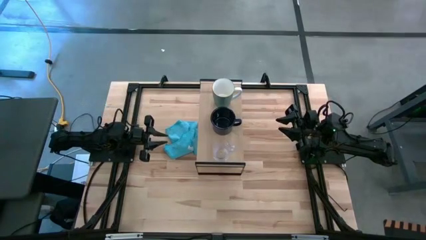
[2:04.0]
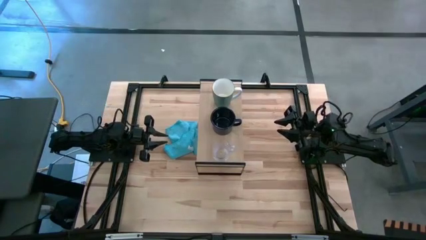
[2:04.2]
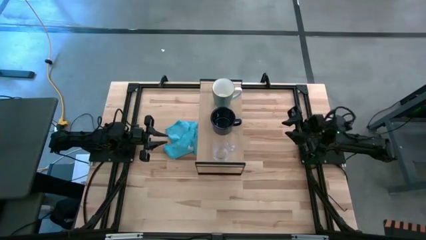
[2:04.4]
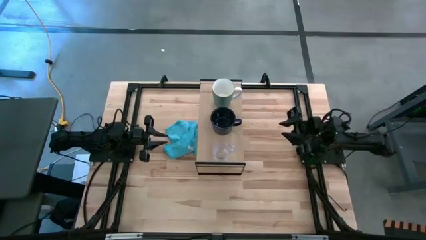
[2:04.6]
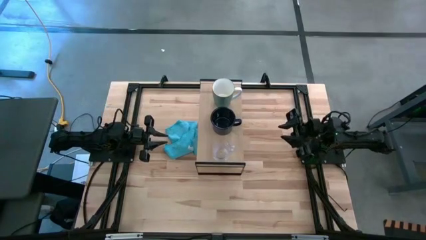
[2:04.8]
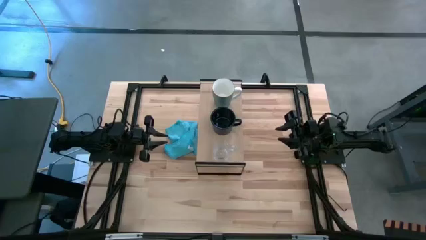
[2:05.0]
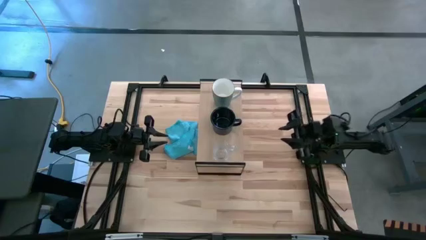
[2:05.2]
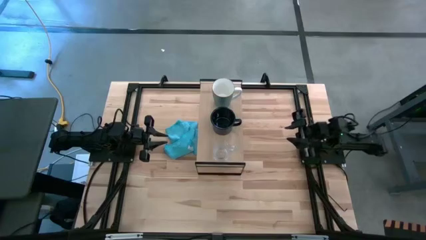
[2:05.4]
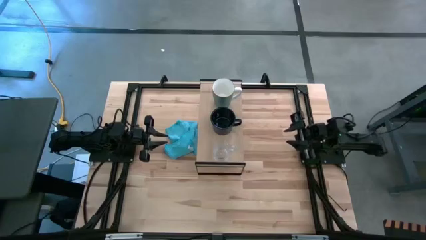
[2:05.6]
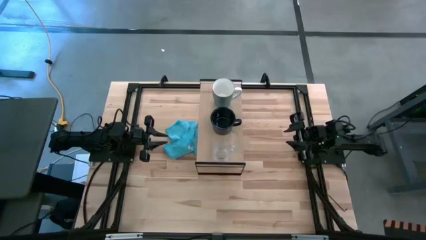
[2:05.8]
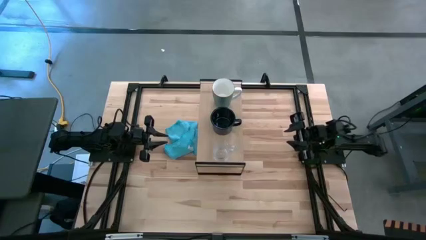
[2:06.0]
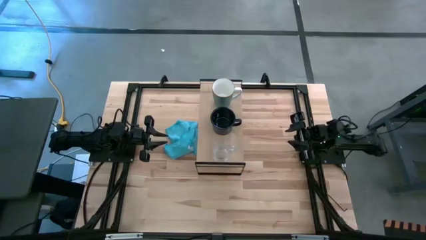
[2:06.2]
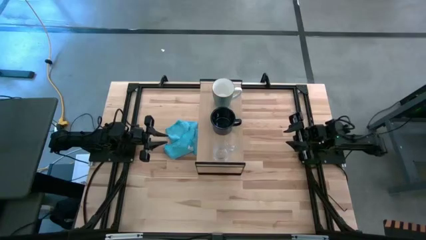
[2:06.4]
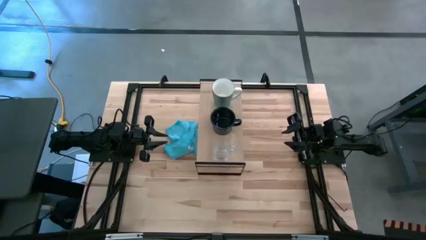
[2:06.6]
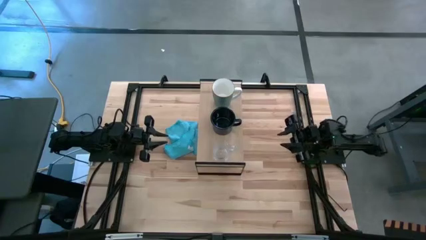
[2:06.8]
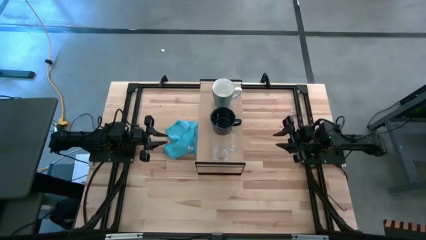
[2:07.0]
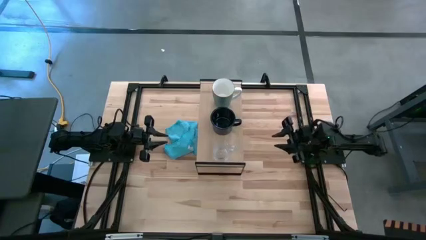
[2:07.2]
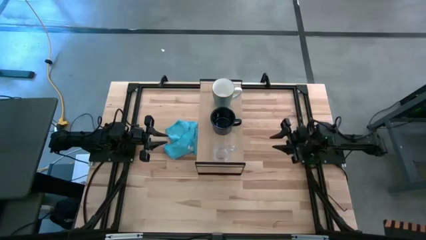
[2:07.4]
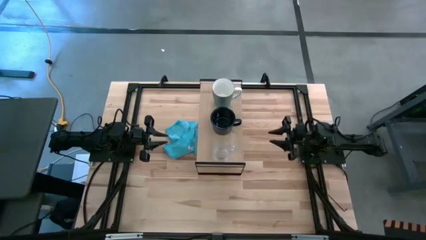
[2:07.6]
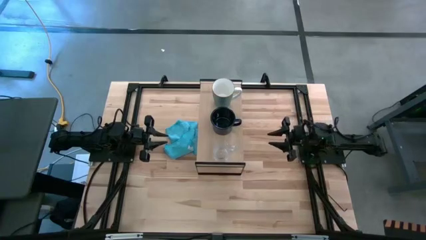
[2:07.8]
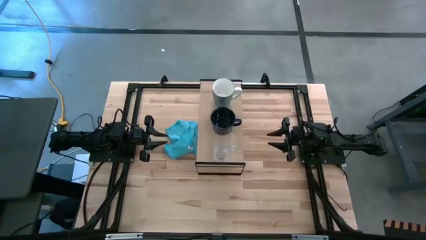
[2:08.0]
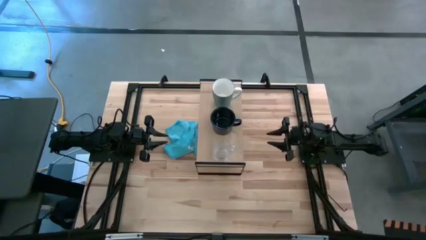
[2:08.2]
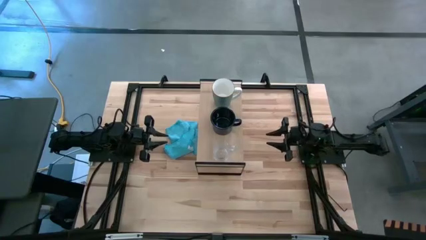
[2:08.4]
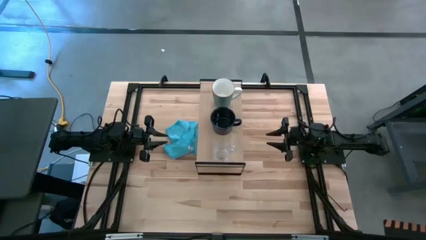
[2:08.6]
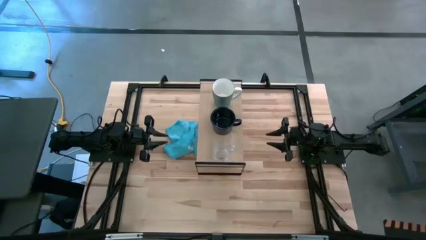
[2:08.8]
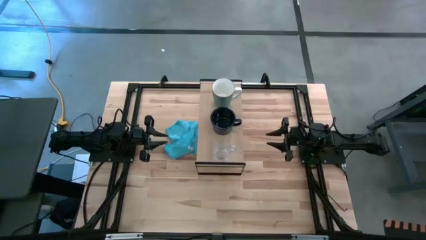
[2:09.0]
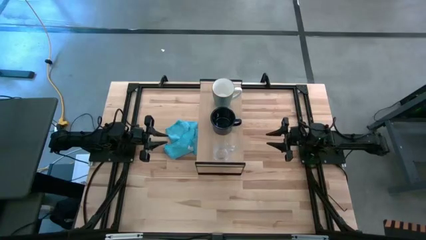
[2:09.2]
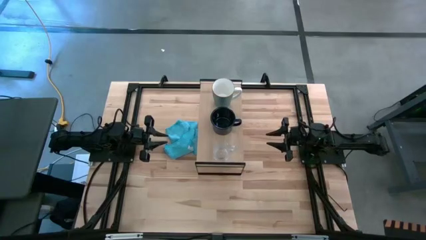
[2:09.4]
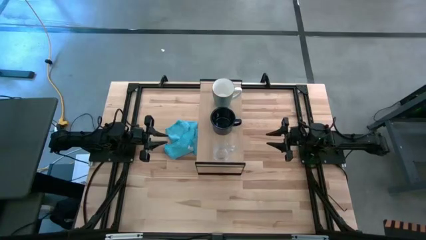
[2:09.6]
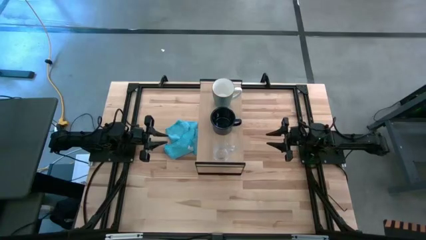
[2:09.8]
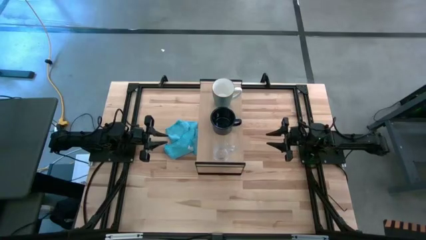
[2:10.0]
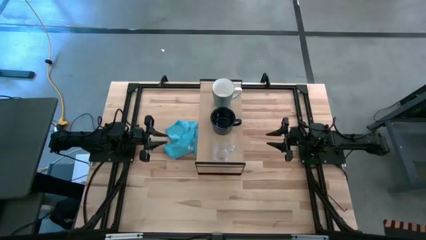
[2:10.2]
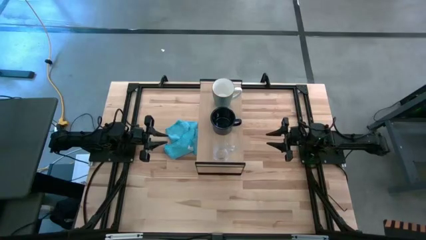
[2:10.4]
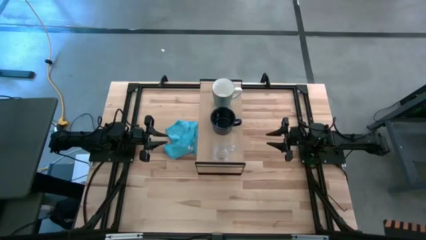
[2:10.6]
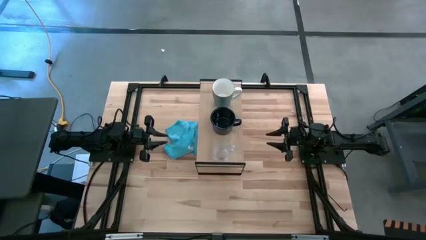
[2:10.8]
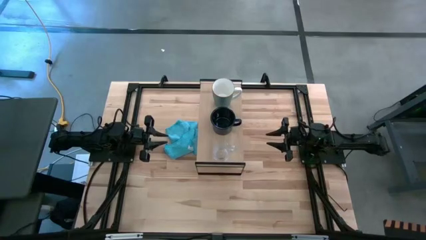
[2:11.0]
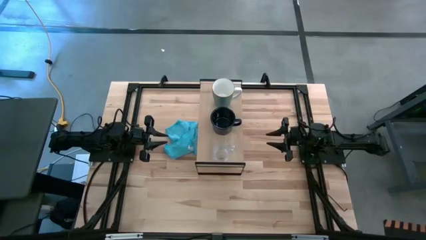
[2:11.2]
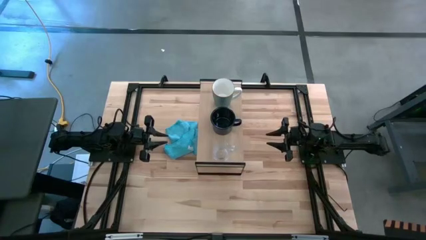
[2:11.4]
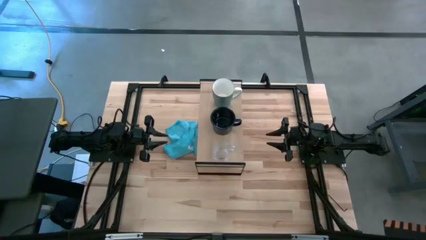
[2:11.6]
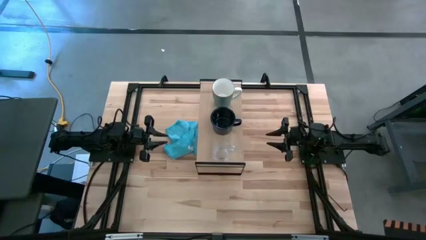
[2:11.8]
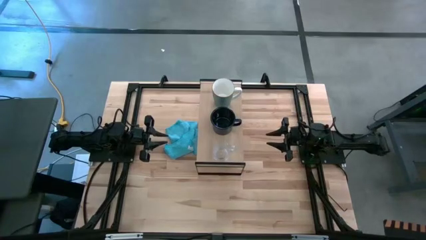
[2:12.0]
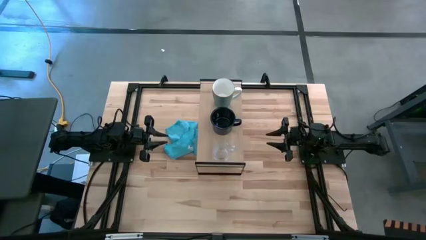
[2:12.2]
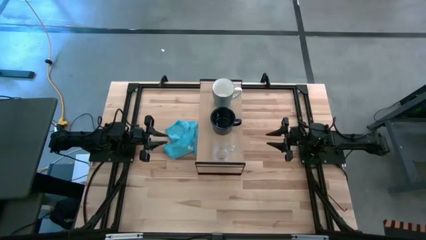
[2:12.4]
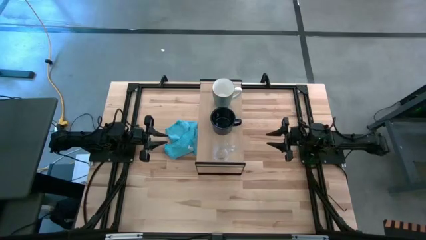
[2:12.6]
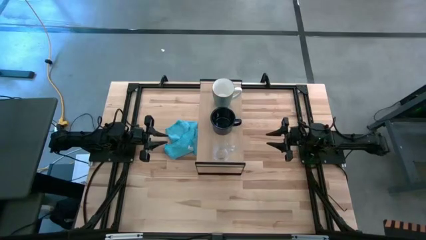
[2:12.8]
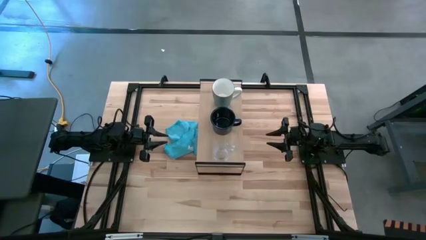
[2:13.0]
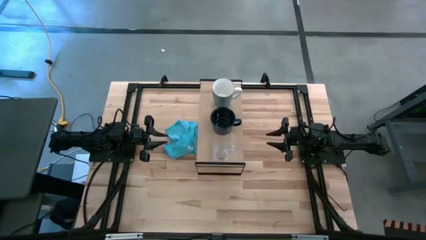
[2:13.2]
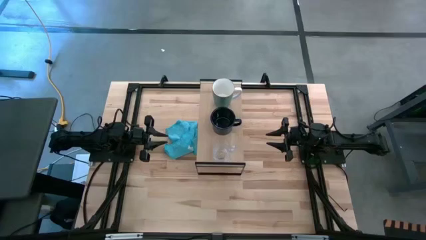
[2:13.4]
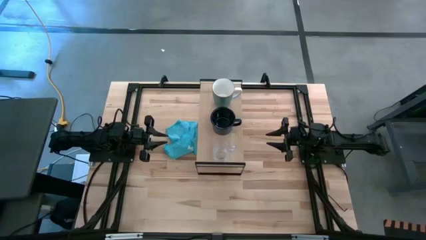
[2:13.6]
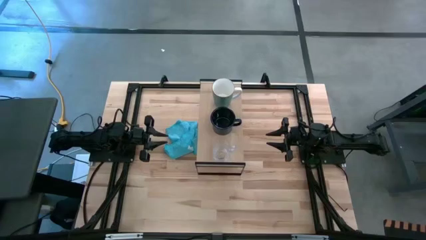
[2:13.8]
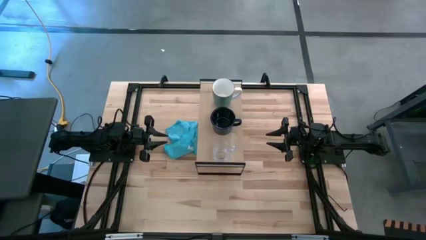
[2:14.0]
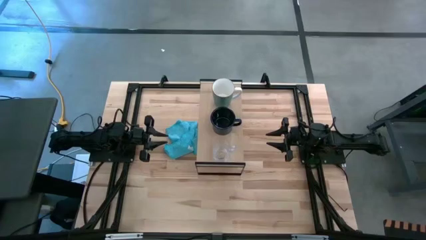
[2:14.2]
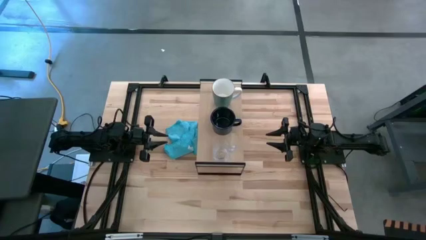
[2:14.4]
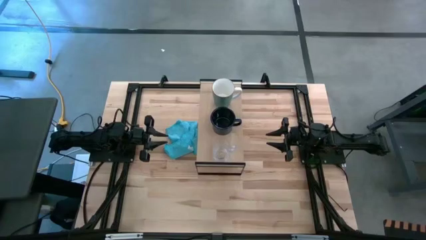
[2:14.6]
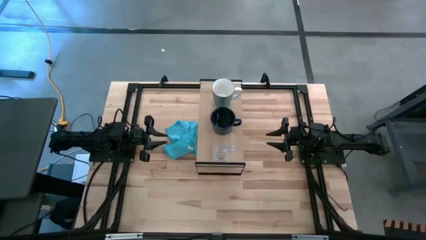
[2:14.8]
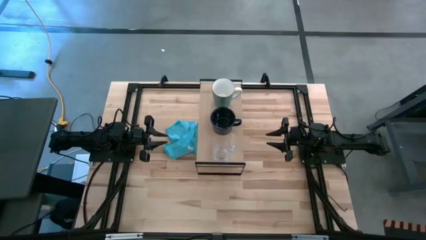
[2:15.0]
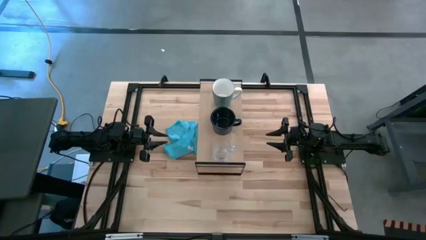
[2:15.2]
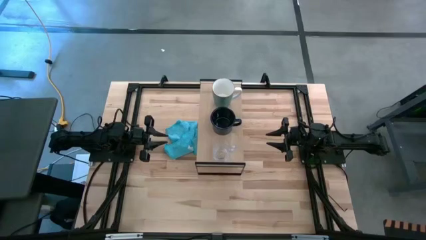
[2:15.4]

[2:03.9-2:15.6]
Task: Stack small to large cups/mugs on shelf
Return to Home Position
